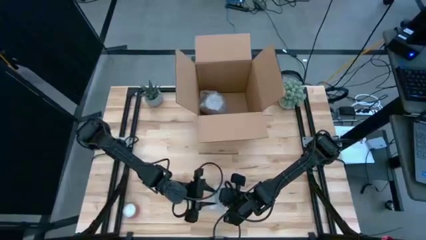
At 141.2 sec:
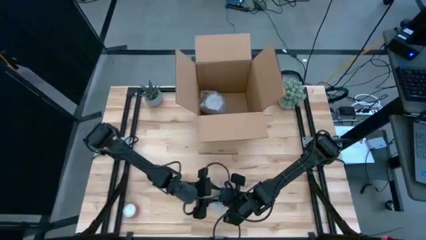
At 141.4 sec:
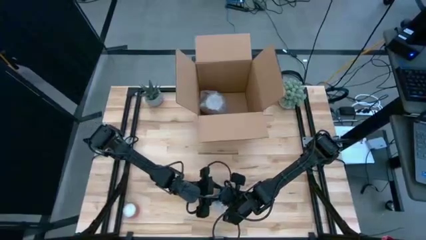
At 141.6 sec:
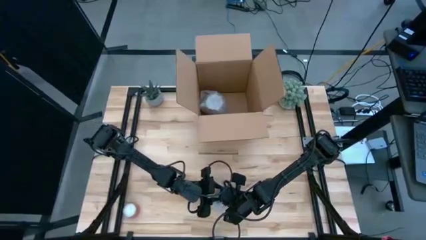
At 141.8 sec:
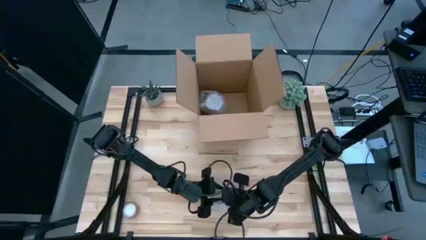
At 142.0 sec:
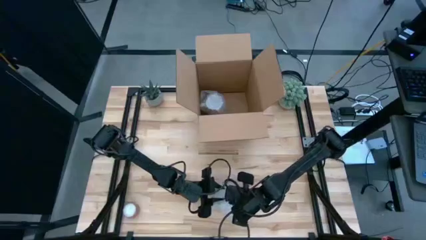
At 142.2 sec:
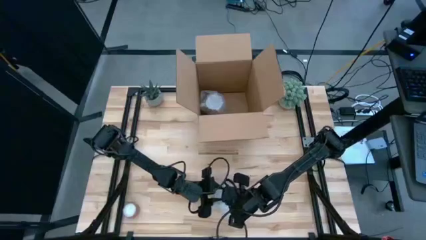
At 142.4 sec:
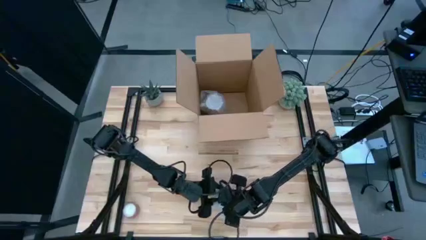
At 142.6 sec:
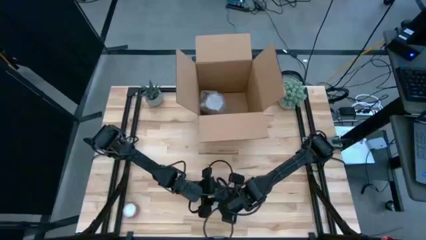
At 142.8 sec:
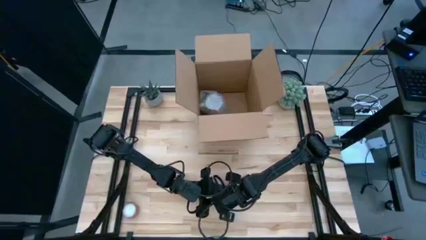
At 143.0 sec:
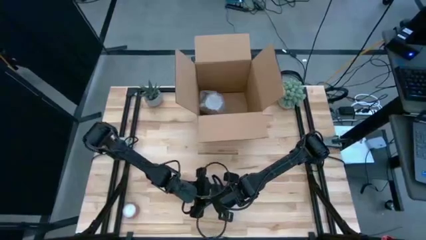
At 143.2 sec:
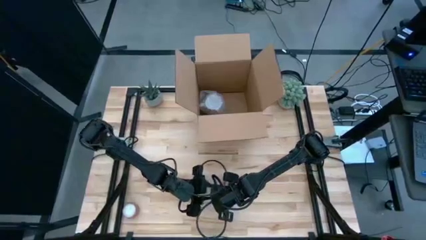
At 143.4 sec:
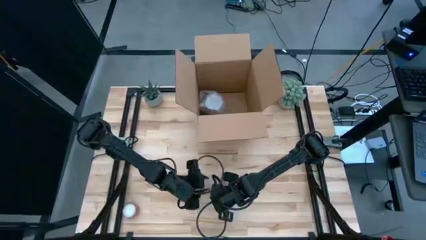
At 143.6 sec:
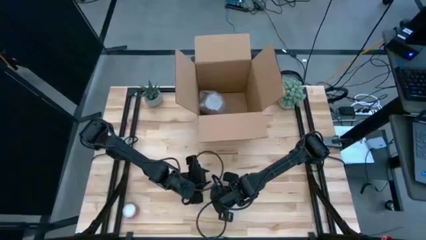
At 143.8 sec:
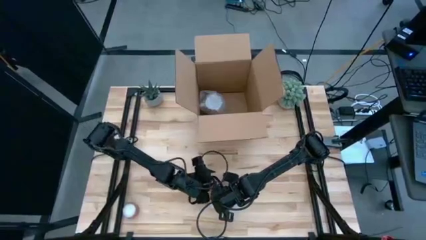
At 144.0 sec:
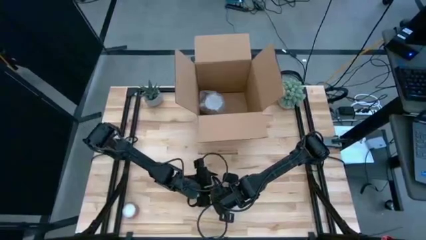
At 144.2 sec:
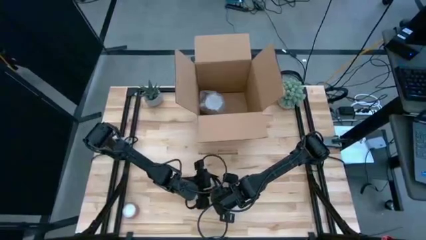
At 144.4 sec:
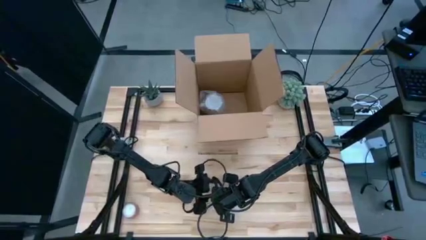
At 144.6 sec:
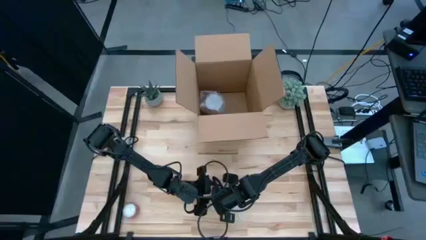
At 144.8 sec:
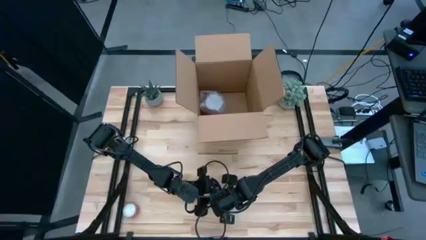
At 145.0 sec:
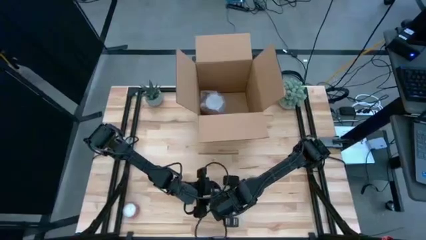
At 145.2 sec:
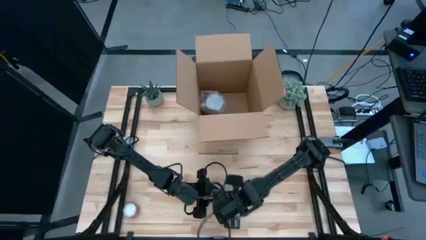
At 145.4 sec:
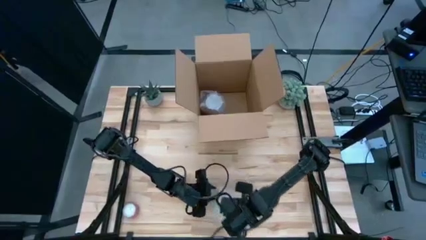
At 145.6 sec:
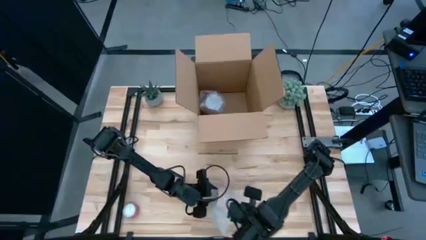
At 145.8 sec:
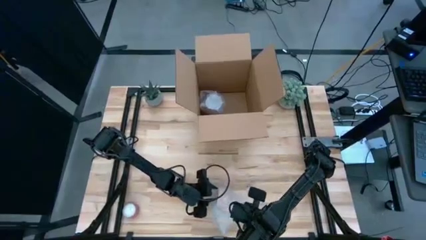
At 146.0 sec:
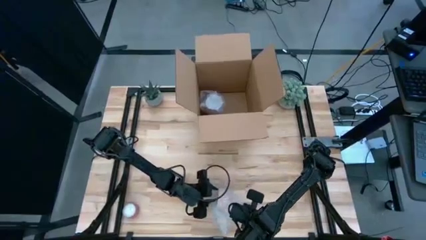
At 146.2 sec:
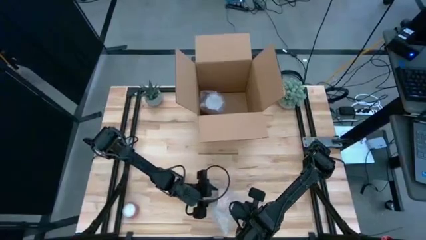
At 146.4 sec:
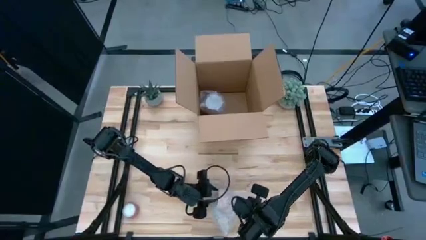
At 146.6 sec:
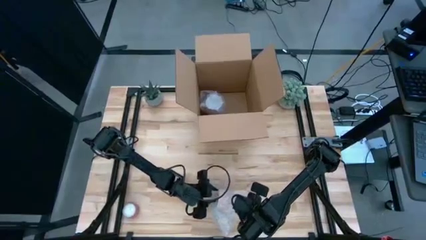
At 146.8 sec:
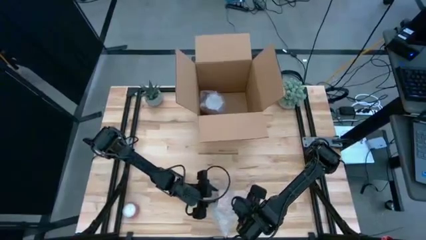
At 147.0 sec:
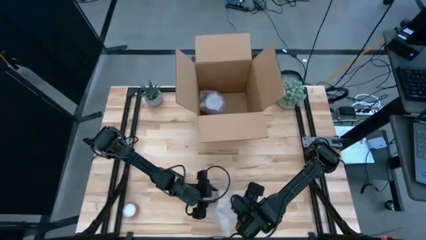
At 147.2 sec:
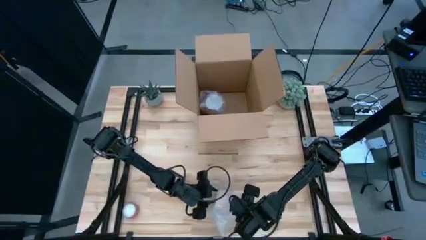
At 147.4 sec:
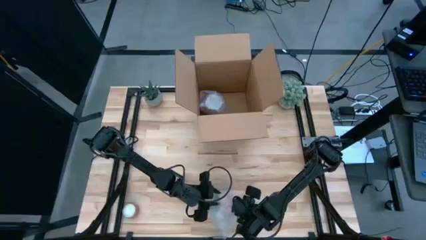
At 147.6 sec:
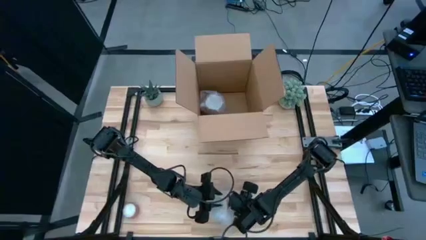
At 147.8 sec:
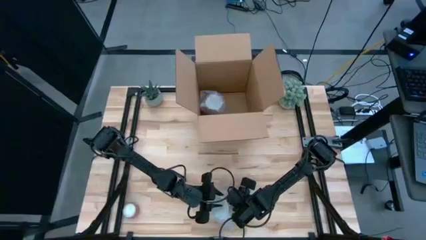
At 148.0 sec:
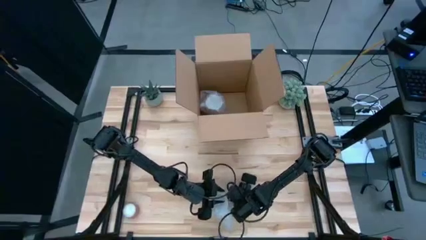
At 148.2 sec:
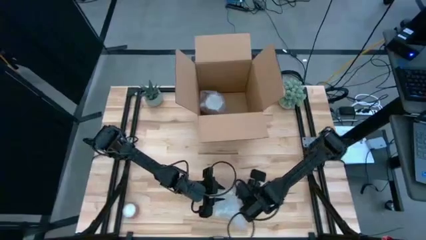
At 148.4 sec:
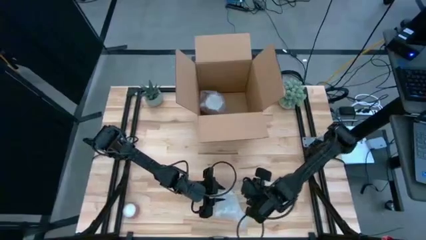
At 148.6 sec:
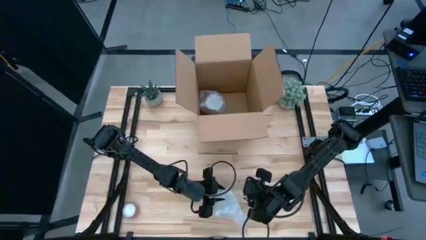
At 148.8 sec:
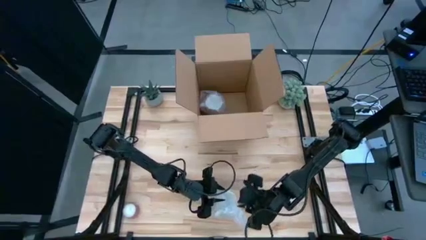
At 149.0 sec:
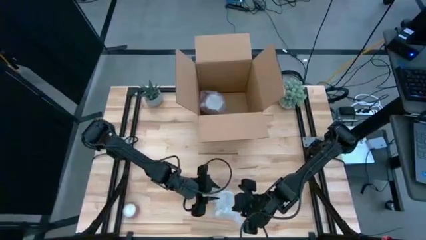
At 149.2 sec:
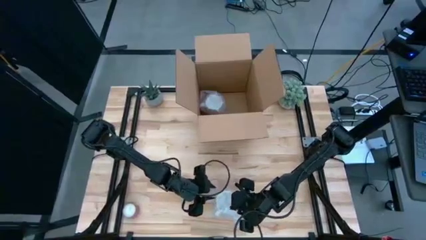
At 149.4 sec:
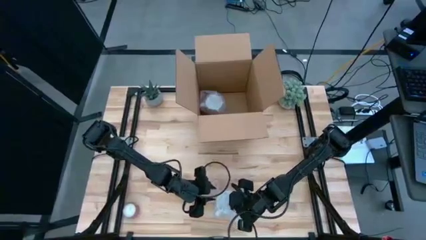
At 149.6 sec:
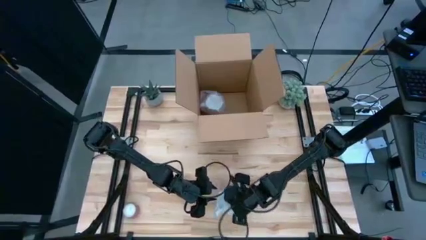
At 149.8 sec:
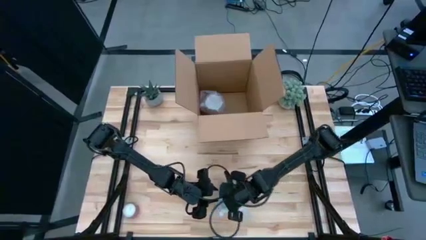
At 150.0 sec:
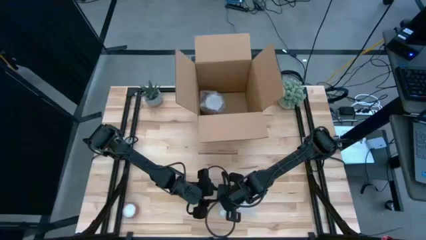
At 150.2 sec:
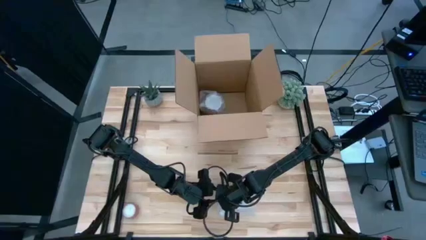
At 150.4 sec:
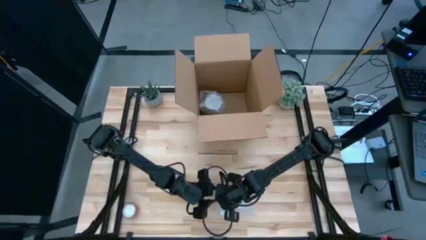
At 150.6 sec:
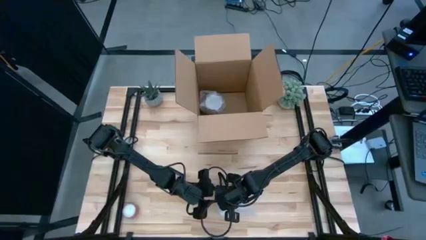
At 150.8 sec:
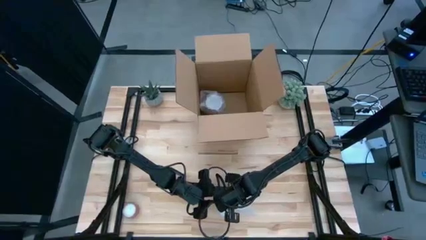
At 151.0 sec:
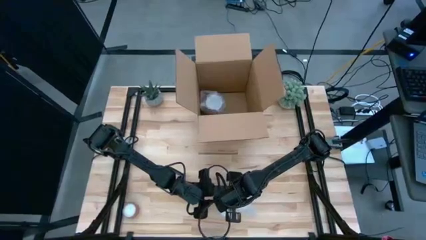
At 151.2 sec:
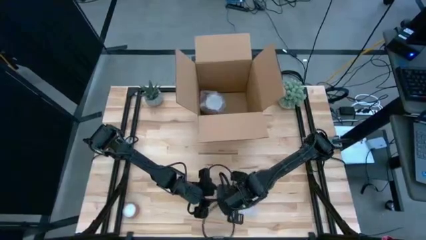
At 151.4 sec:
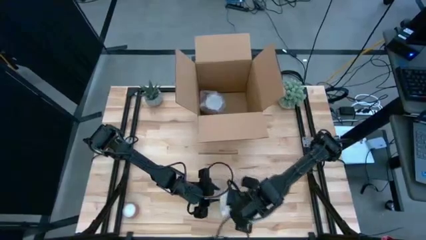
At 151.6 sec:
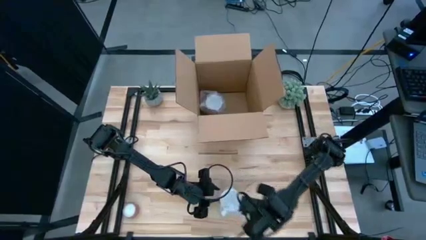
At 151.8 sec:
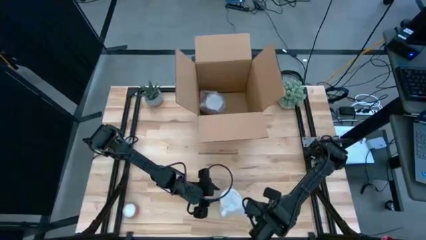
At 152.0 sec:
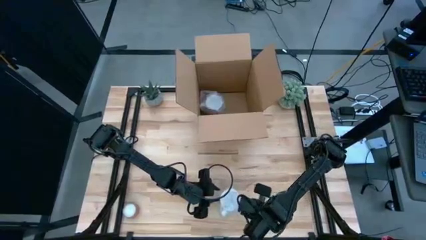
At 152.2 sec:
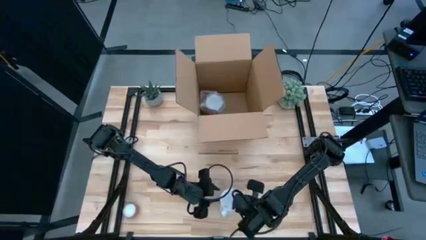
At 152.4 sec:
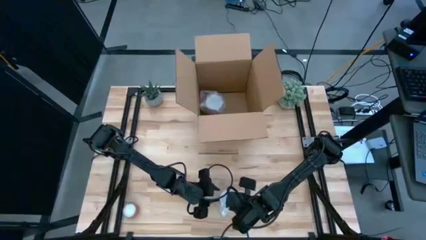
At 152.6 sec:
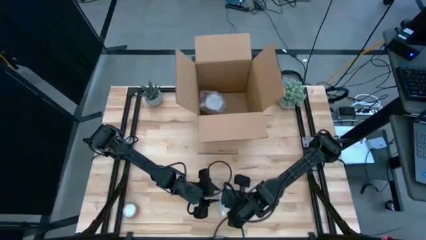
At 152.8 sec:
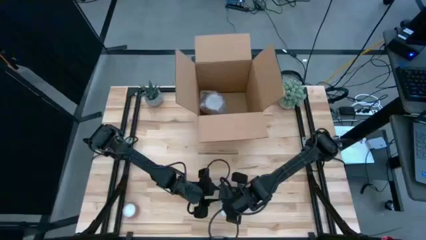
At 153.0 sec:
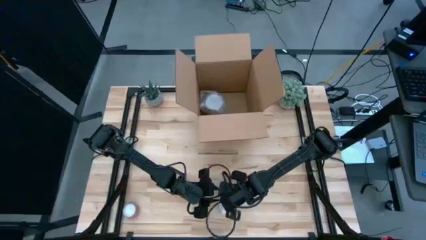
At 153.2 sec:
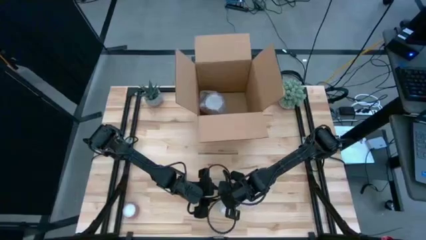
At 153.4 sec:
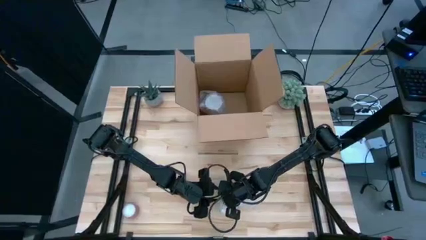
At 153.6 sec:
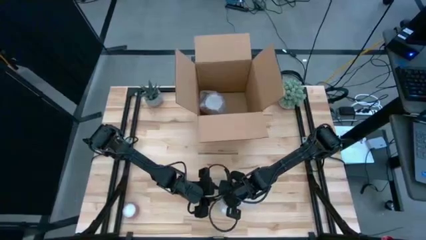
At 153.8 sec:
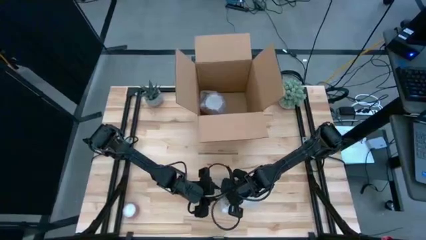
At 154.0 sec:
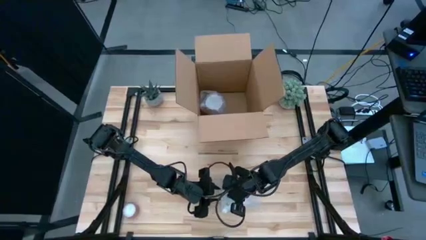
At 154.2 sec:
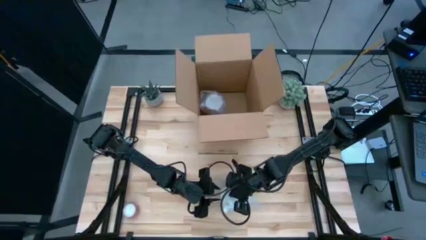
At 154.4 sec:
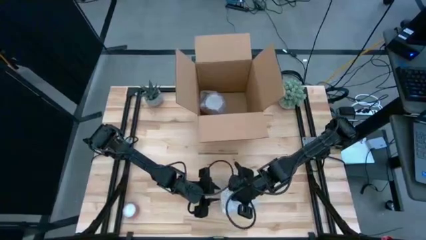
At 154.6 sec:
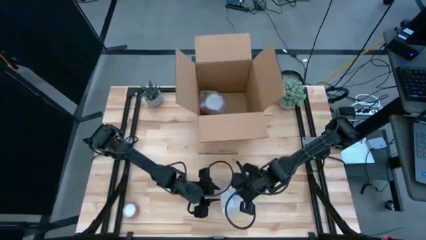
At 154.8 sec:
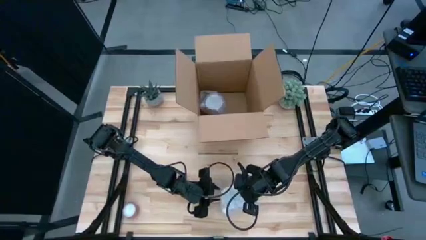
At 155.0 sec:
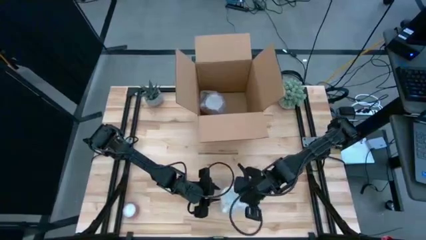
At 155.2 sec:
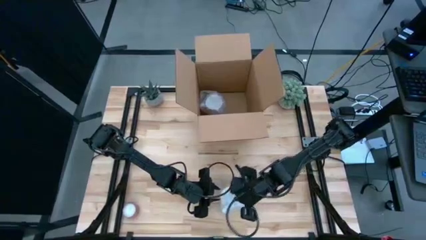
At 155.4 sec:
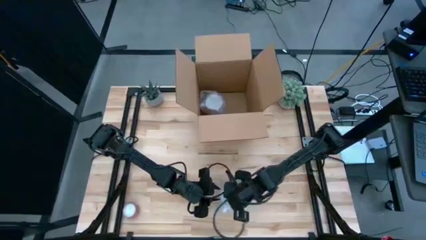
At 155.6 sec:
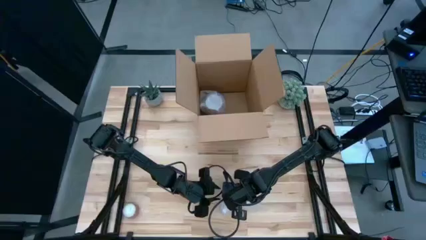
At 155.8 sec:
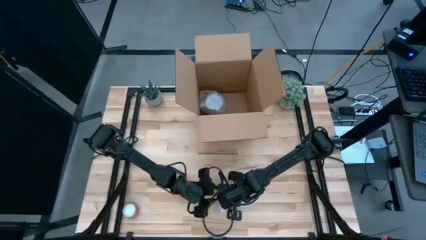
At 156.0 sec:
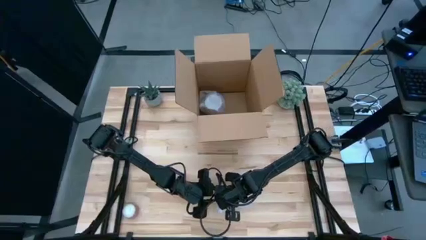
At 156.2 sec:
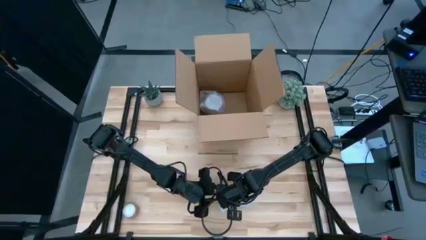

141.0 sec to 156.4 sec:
Task: wrap mug
Wrap the orange mug with the transparent bubble wrap
